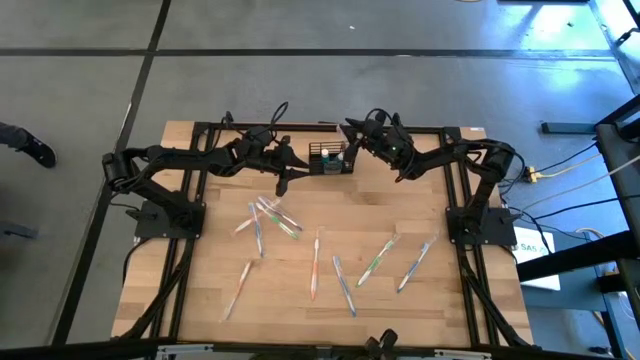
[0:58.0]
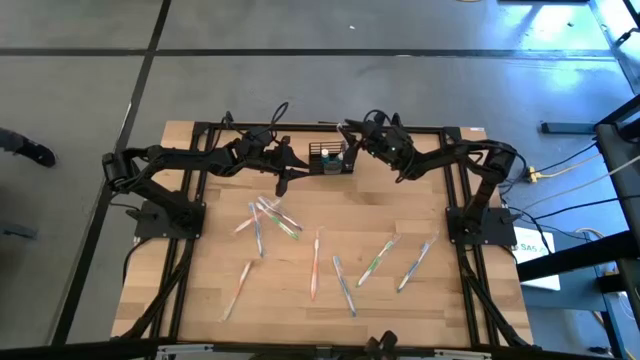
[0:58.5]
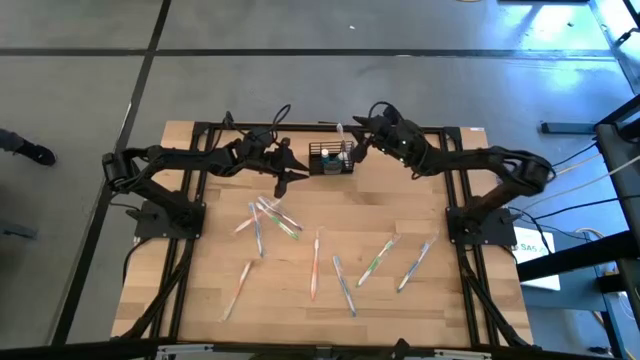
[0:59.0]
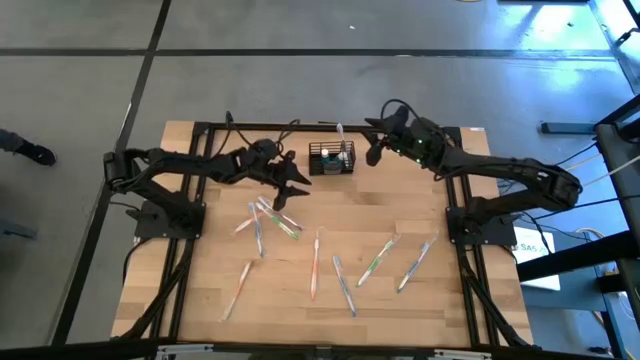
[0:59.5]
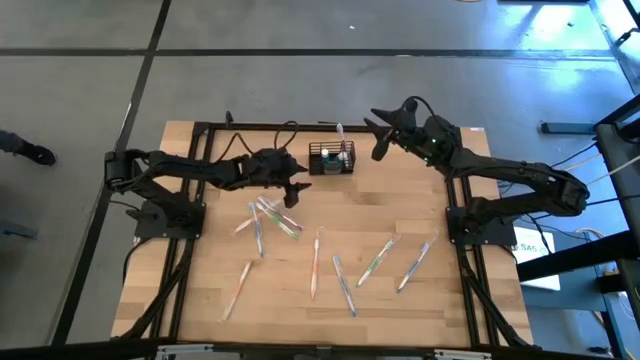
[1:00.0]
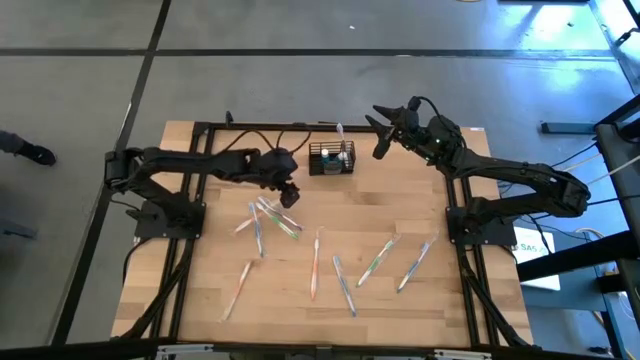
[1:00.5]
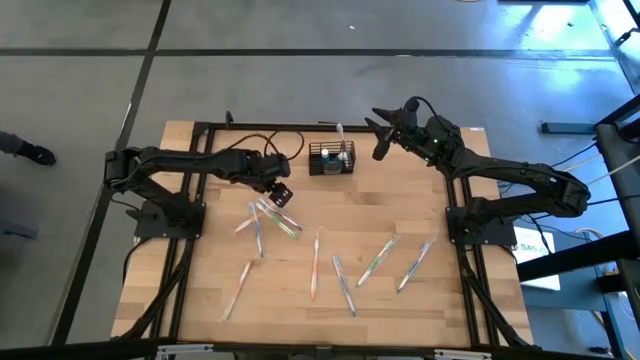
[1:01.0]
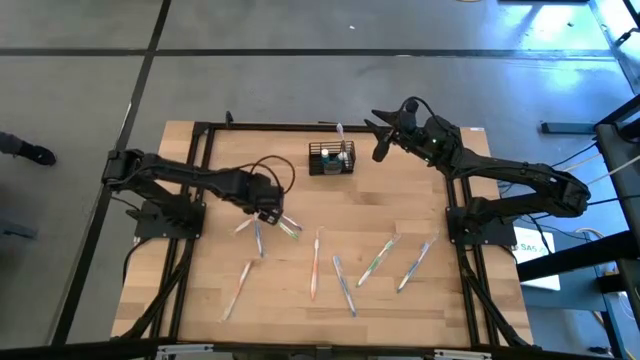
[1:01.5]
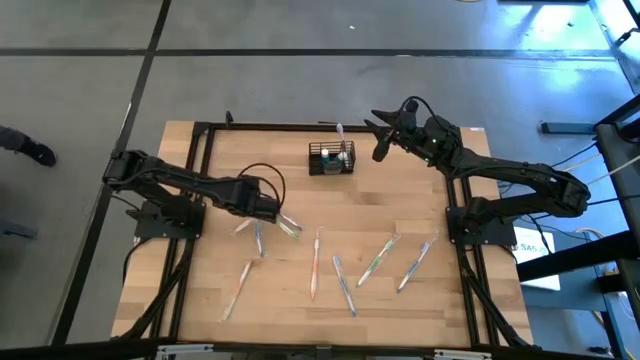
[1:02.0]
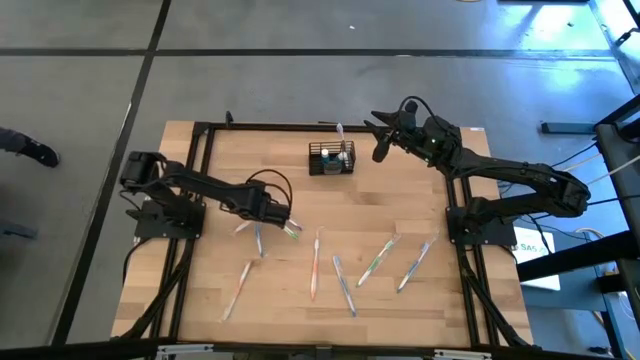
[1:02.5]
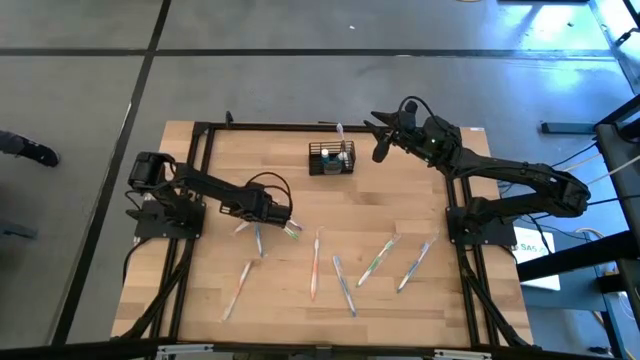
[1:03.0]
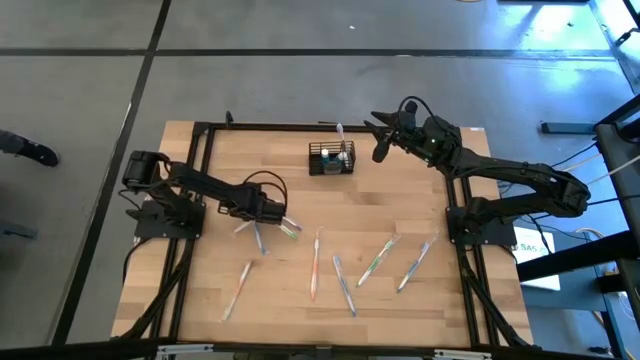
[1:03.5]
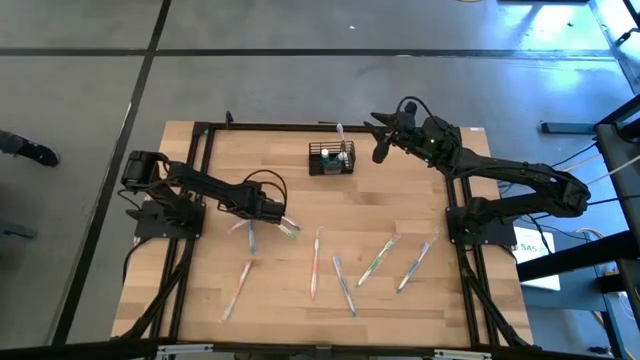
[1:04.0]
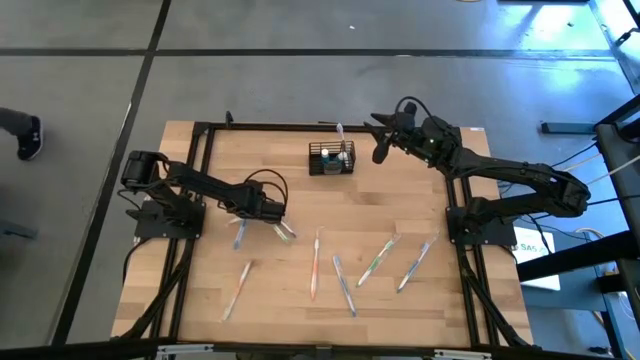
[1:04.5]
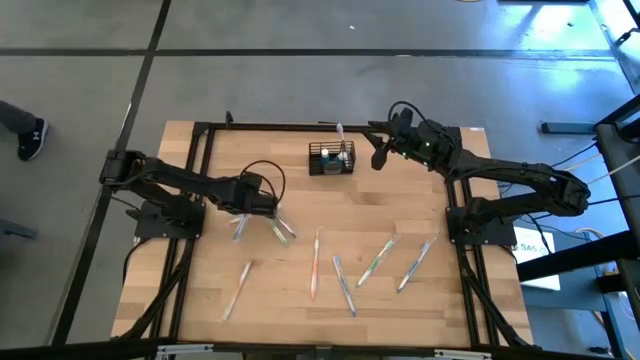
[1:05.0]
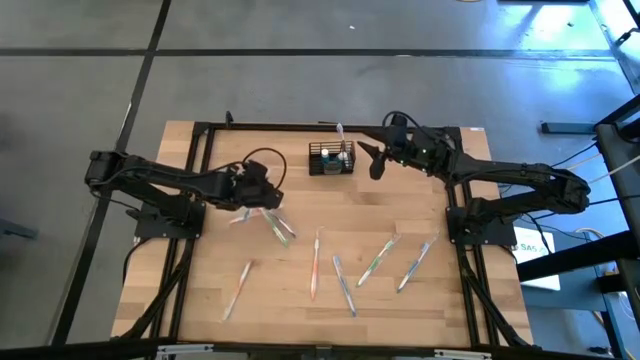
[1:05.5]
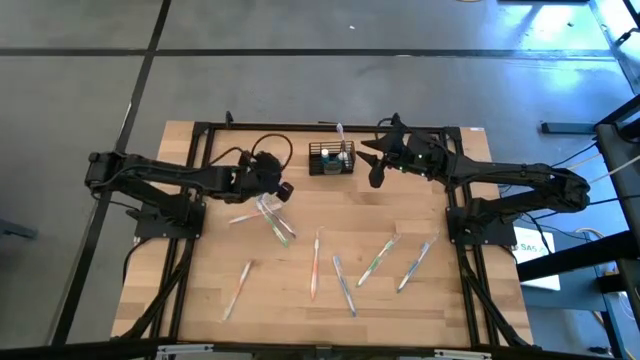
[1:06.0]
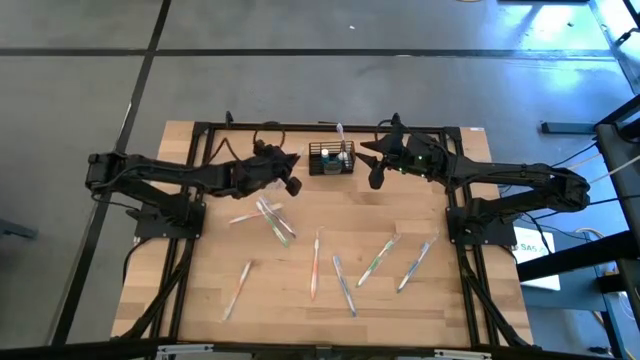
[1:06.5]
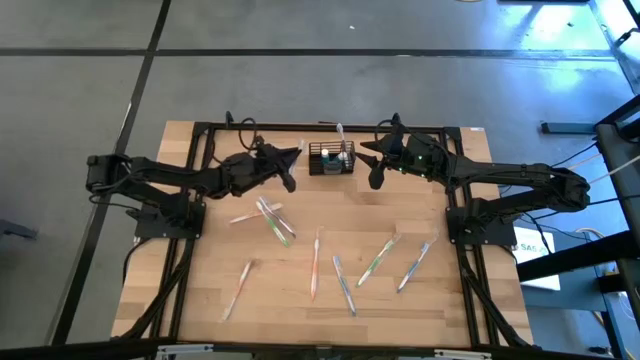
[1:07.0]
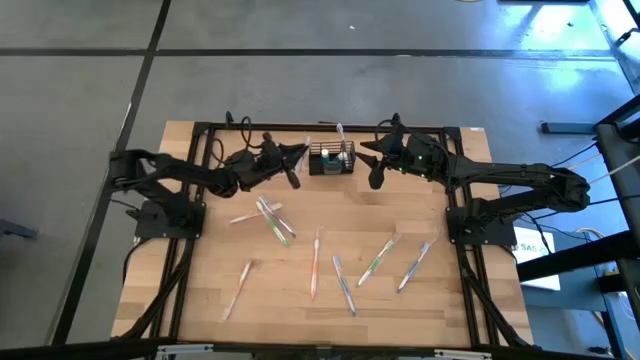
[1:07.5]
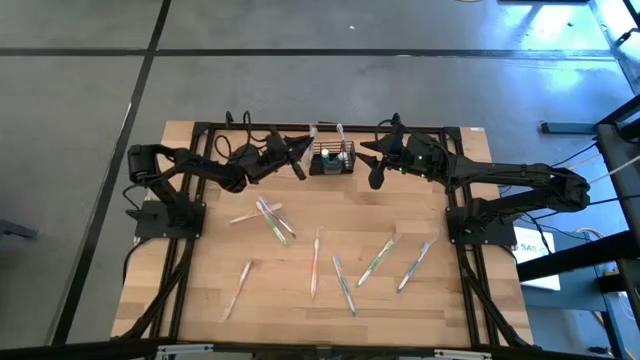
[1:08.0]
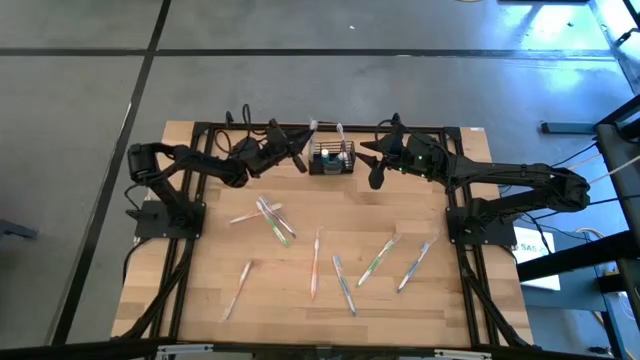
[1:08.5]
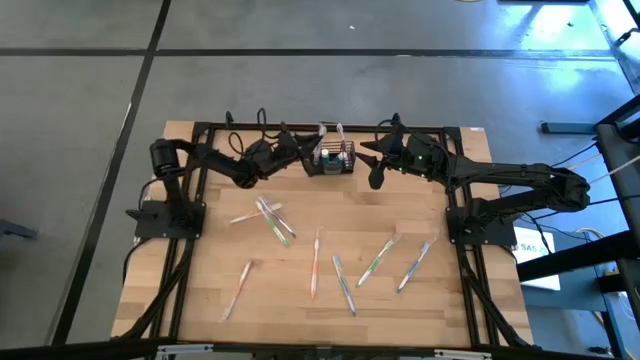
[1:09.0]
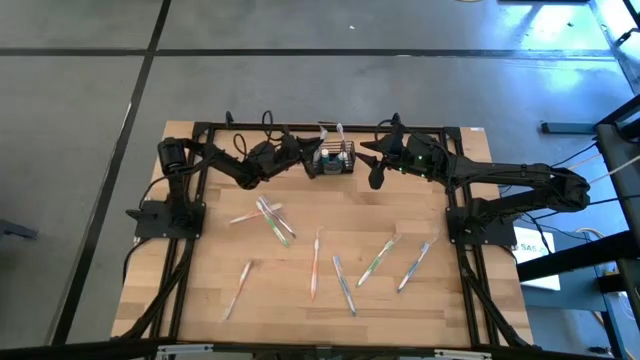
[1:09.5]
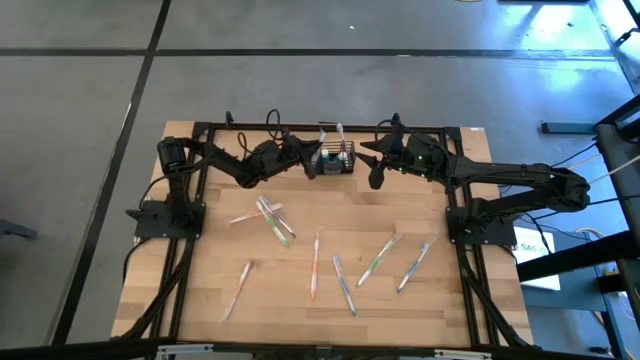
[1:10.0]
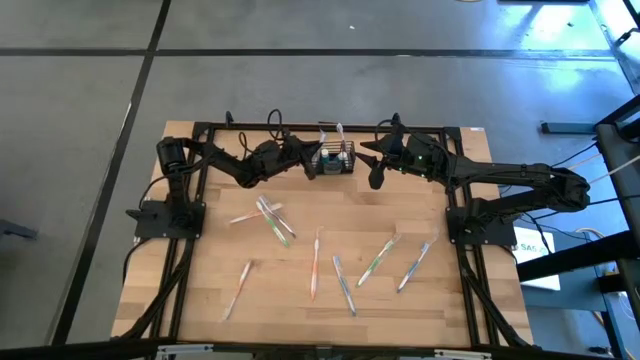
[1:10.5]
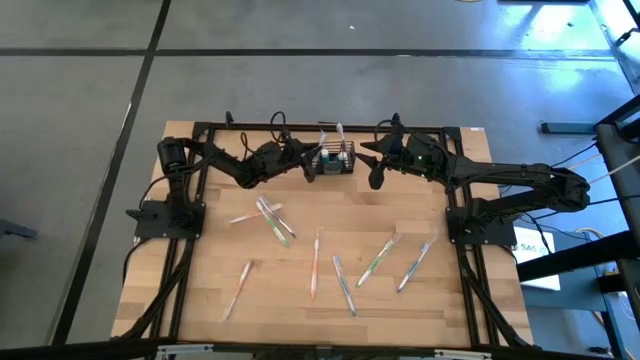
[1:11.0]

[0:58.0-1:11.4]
Task: Pick & Place toothbrushing station
Put the top blue toothbrush in the left section of the wire organizer

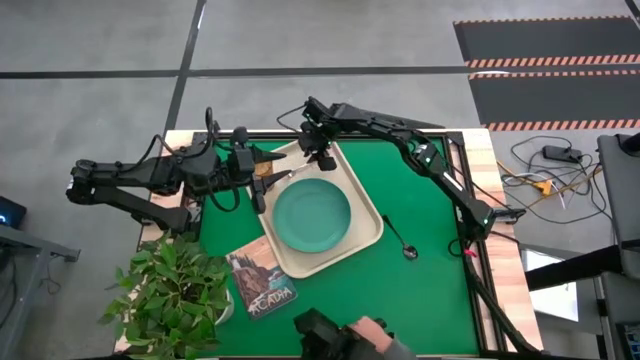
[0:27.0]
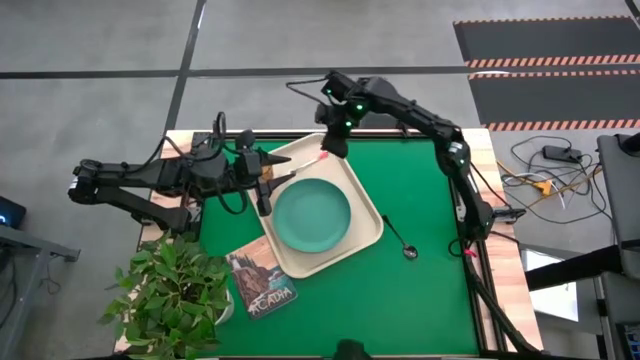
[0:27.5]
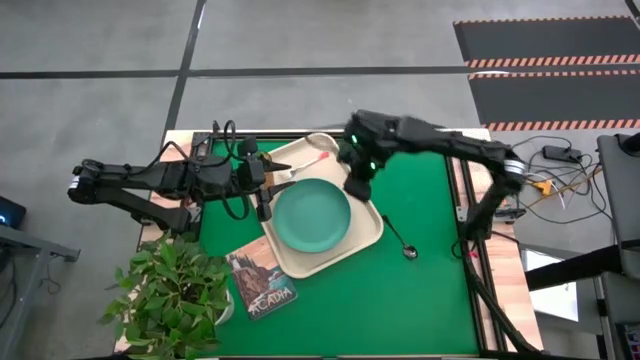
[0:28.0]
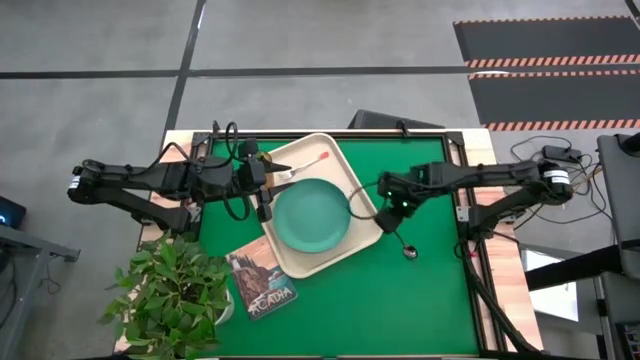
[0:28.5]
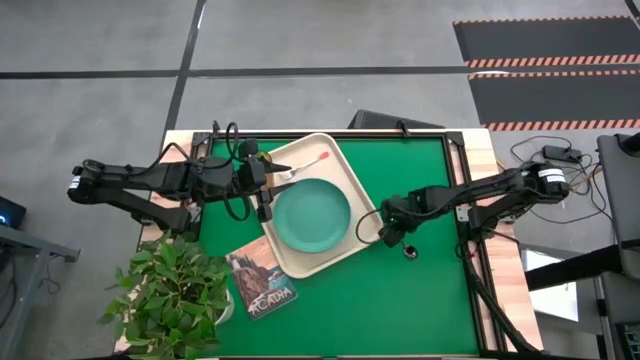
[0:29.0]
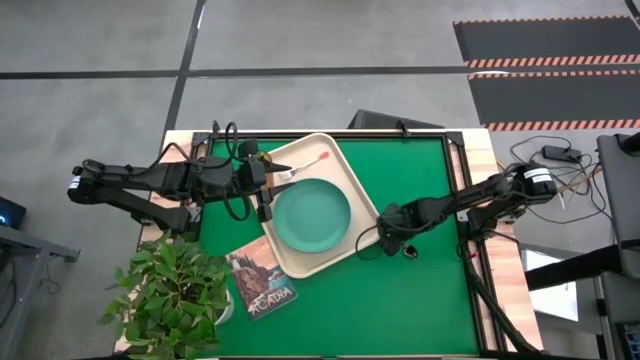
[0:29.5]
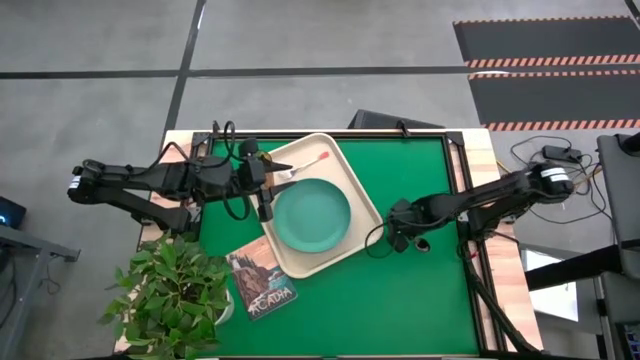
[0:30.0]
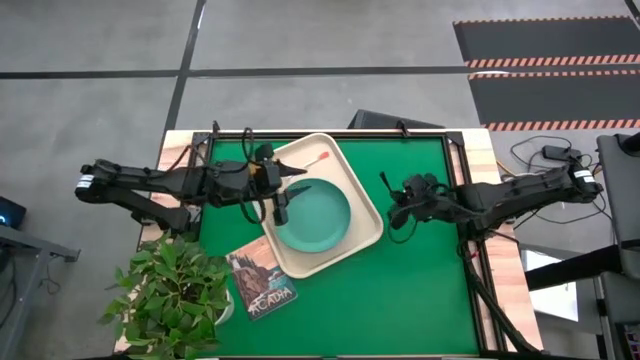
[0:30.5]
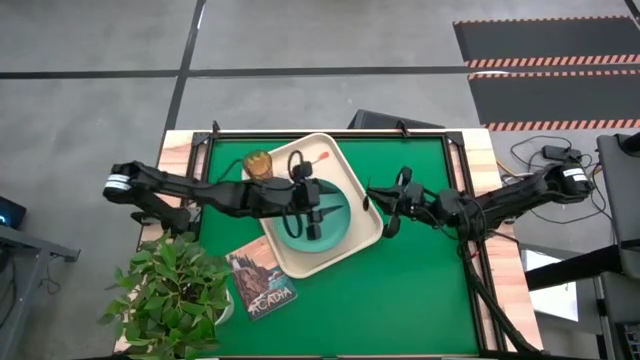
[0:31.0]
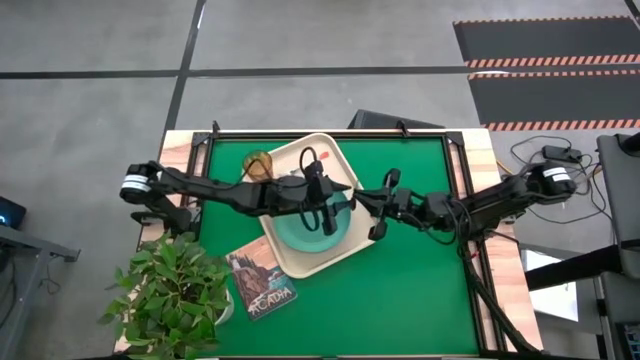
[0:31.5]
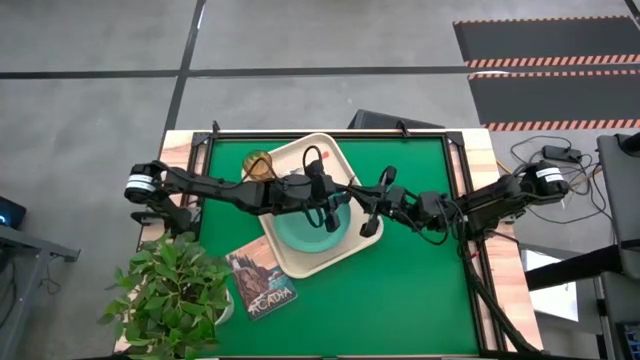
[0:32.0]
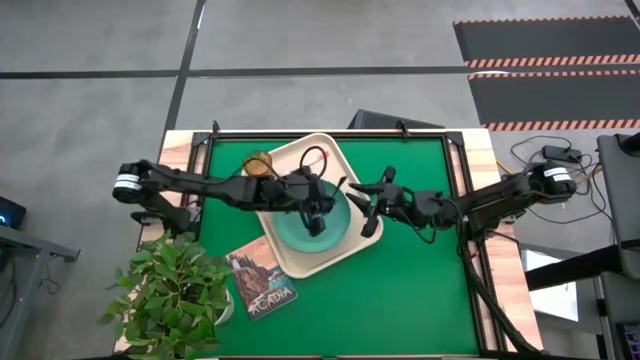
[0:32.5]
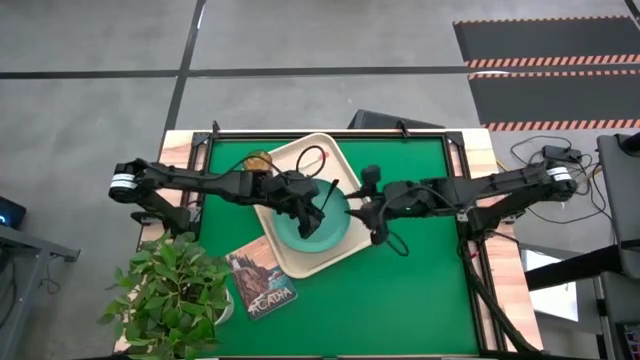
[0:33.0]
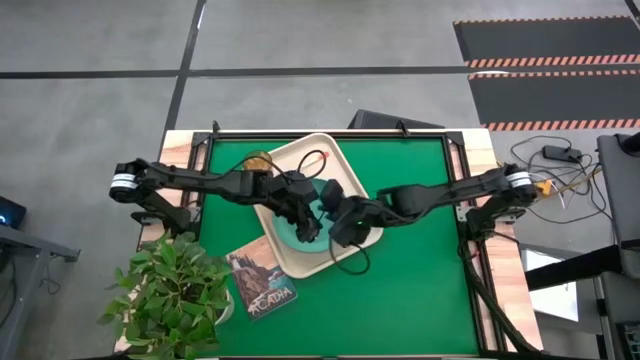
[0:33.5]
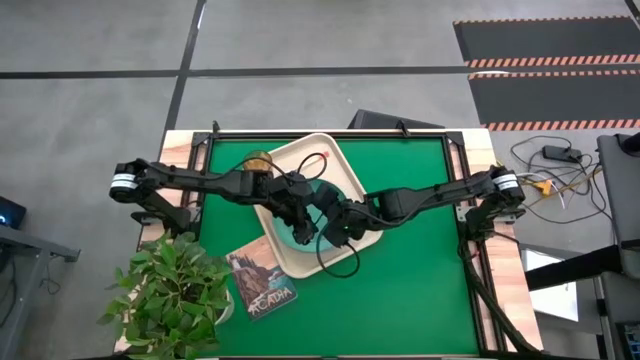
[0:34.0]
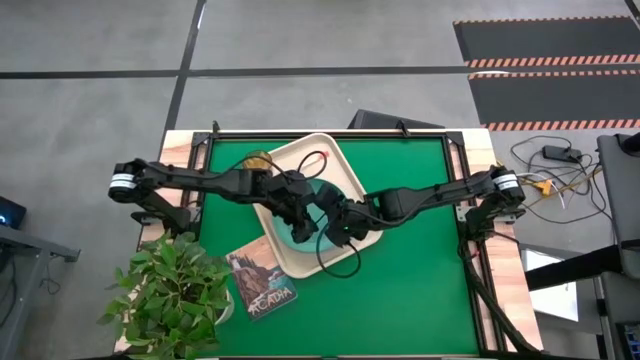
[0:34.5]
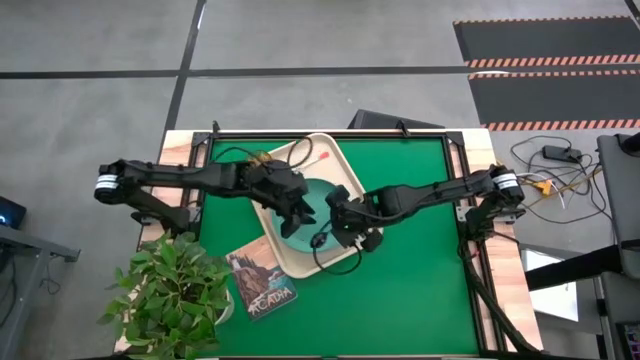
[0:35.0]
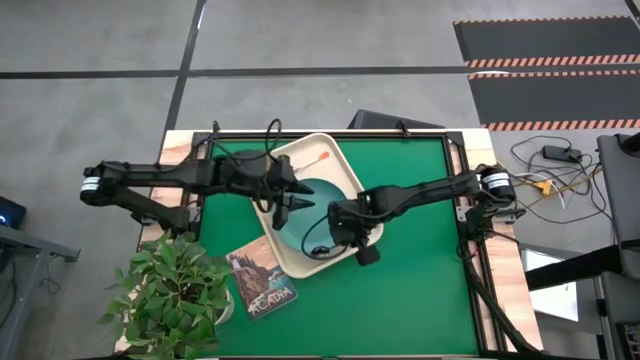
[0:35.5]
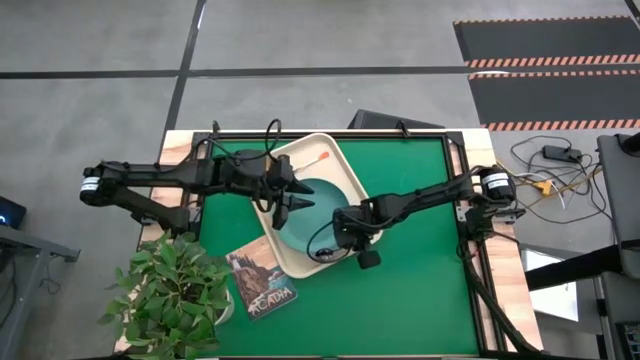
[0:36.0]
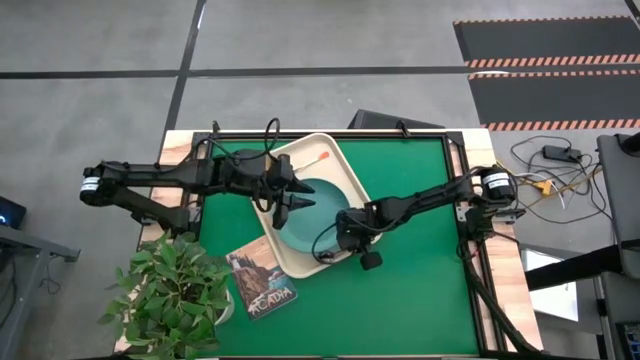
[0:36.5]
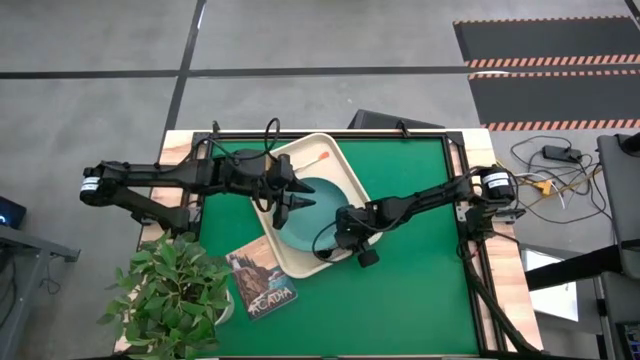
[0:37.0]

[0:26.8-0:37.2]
Task: Pick and place plate/cup/fork/spoon on tray
Put the black spoon on the white serving tray
